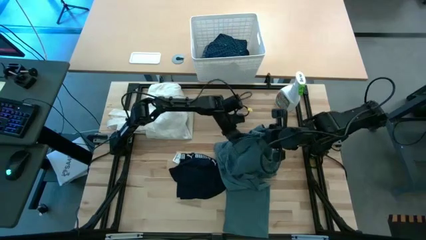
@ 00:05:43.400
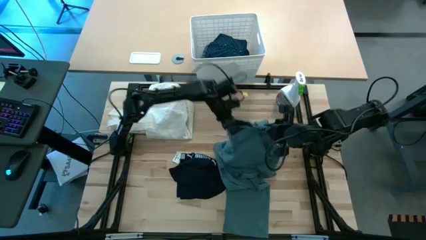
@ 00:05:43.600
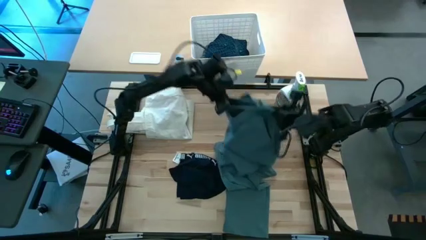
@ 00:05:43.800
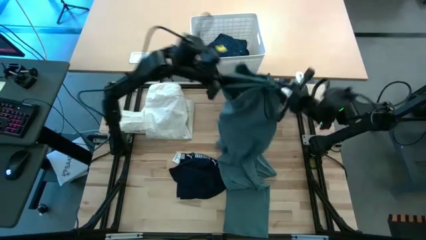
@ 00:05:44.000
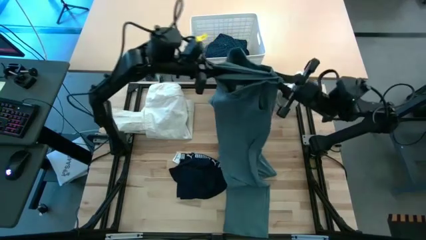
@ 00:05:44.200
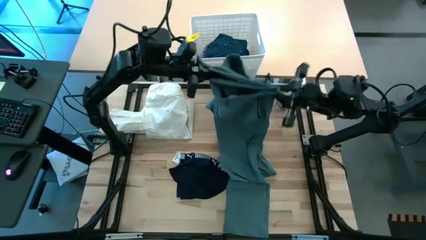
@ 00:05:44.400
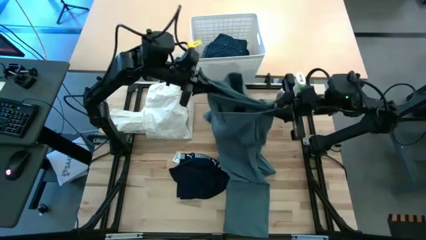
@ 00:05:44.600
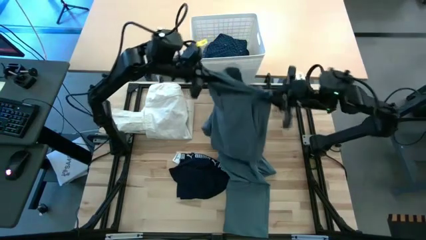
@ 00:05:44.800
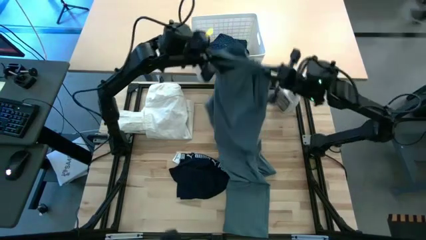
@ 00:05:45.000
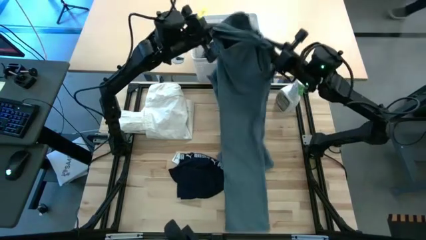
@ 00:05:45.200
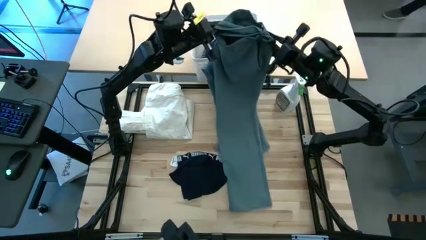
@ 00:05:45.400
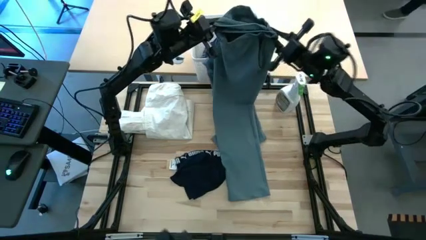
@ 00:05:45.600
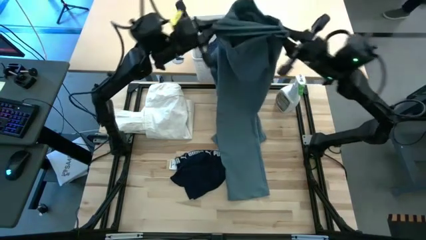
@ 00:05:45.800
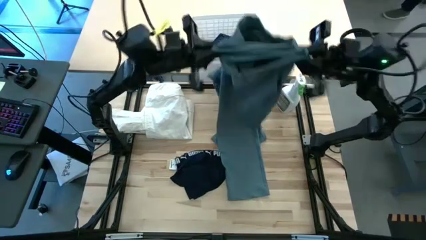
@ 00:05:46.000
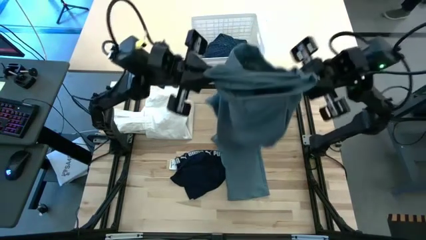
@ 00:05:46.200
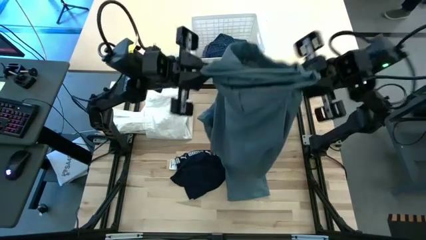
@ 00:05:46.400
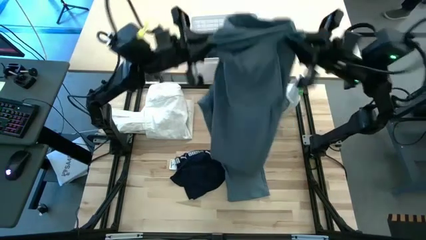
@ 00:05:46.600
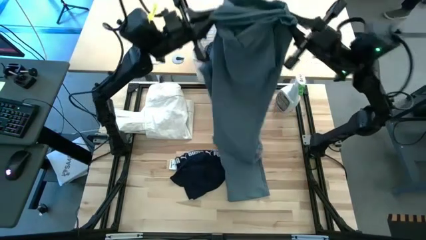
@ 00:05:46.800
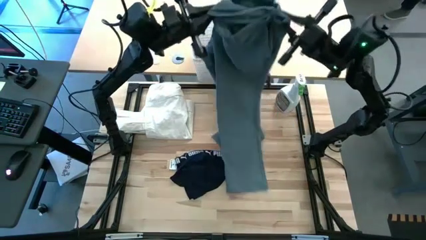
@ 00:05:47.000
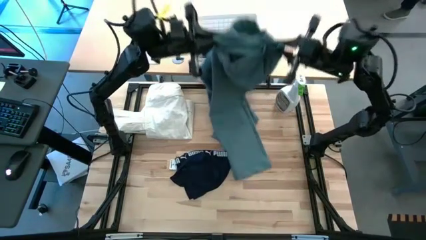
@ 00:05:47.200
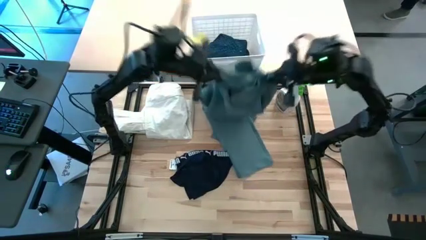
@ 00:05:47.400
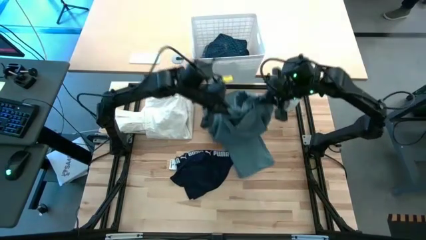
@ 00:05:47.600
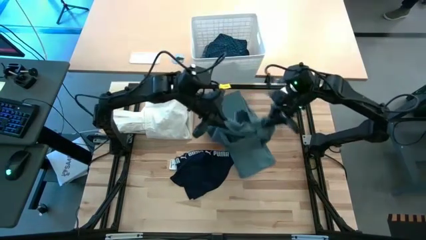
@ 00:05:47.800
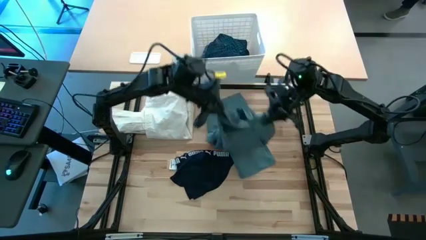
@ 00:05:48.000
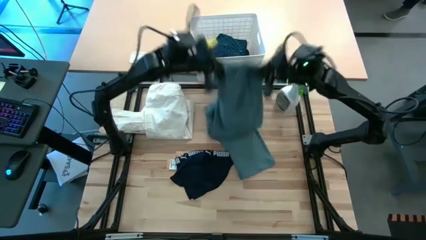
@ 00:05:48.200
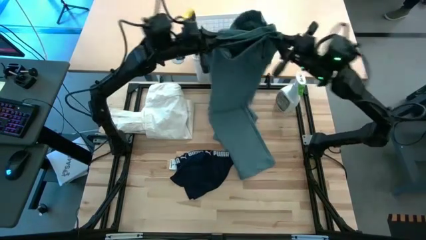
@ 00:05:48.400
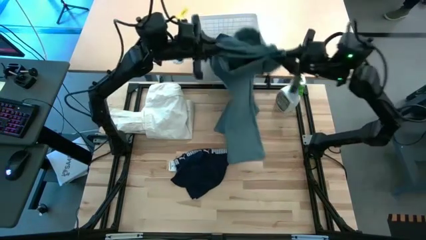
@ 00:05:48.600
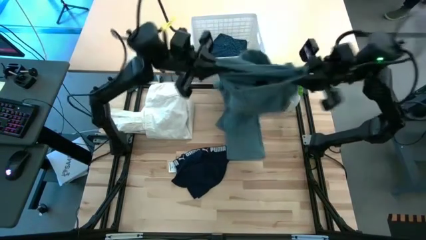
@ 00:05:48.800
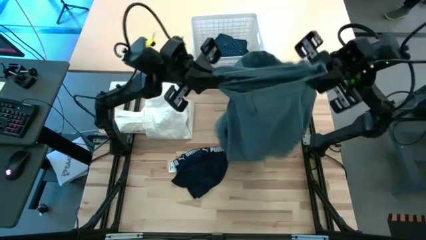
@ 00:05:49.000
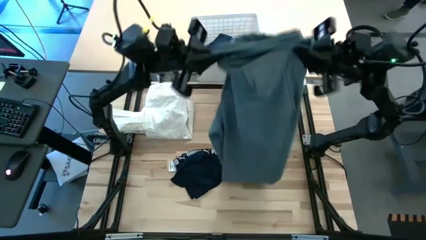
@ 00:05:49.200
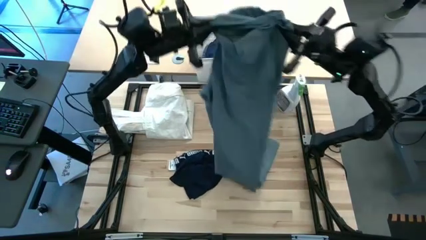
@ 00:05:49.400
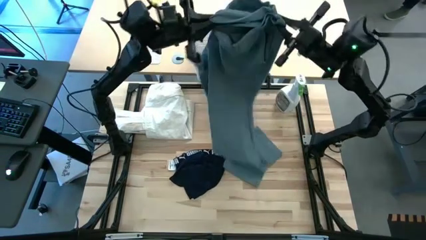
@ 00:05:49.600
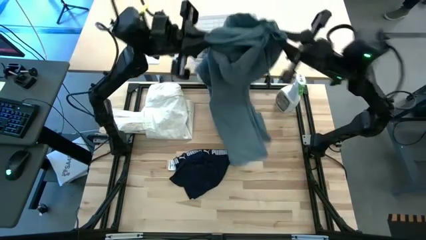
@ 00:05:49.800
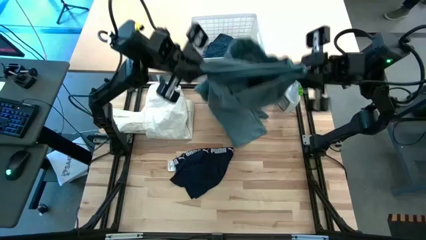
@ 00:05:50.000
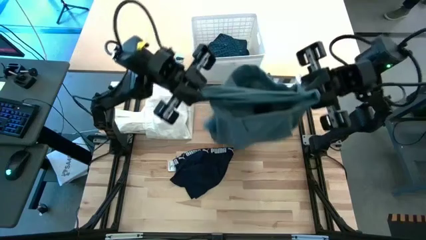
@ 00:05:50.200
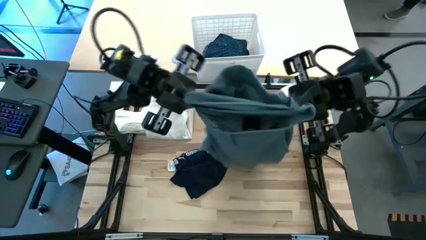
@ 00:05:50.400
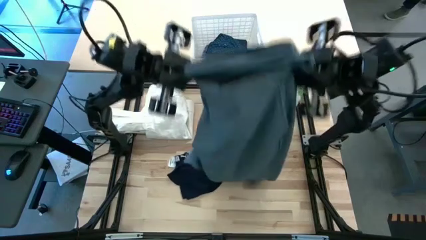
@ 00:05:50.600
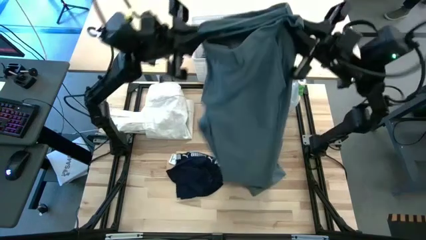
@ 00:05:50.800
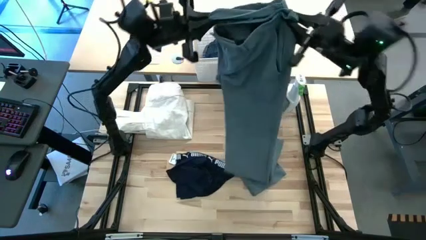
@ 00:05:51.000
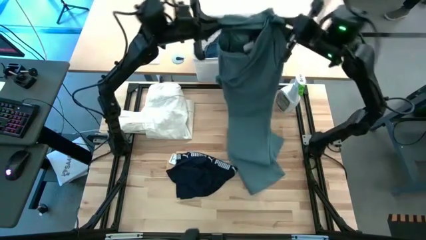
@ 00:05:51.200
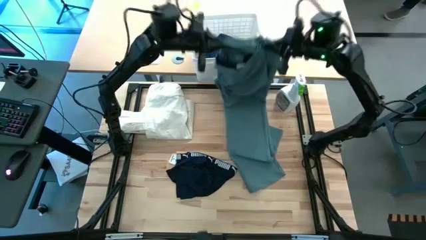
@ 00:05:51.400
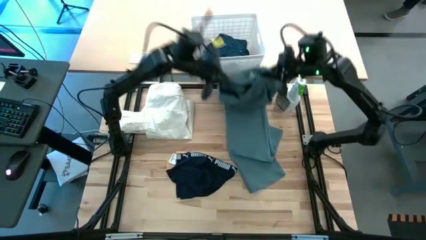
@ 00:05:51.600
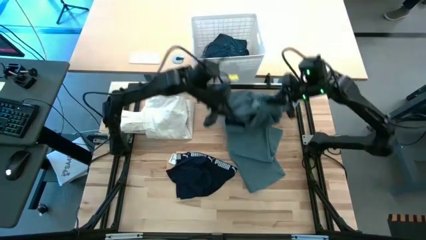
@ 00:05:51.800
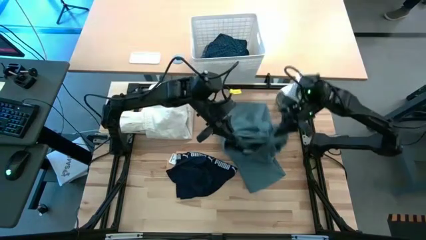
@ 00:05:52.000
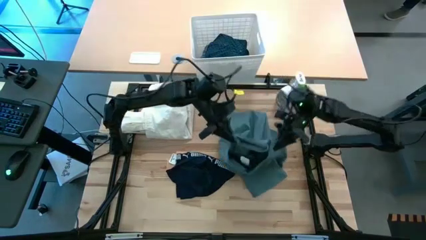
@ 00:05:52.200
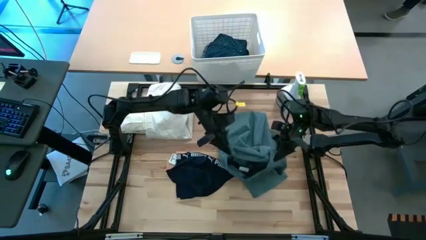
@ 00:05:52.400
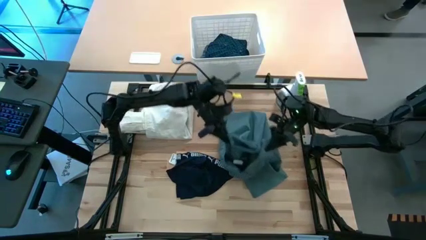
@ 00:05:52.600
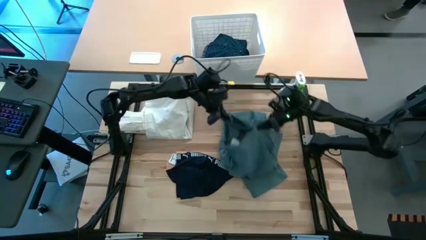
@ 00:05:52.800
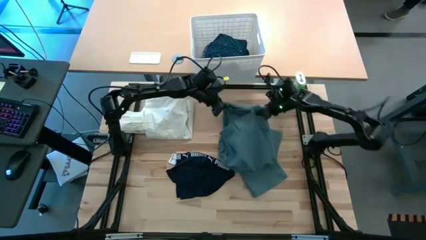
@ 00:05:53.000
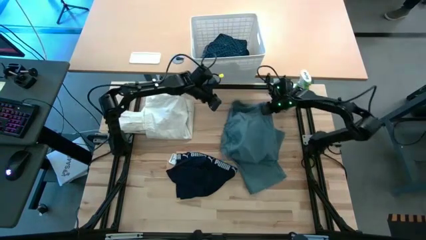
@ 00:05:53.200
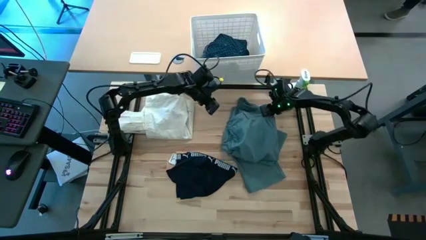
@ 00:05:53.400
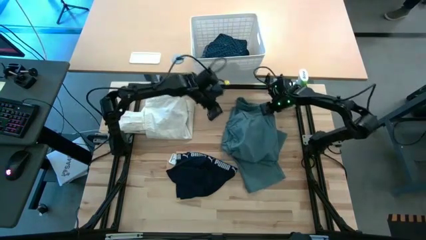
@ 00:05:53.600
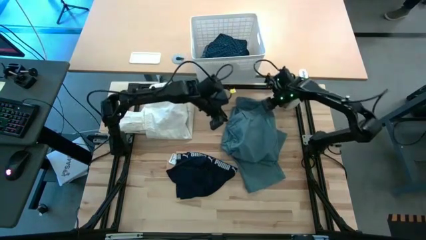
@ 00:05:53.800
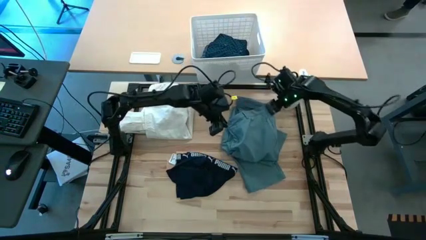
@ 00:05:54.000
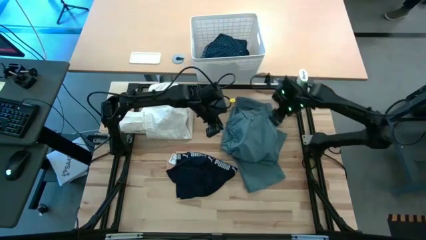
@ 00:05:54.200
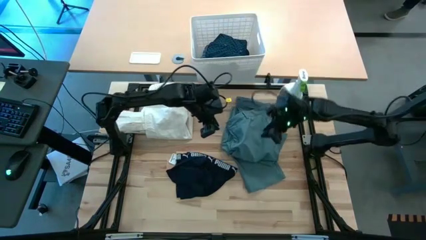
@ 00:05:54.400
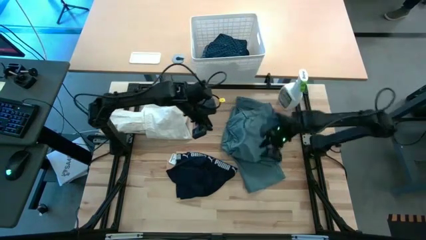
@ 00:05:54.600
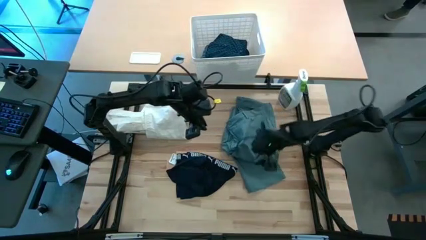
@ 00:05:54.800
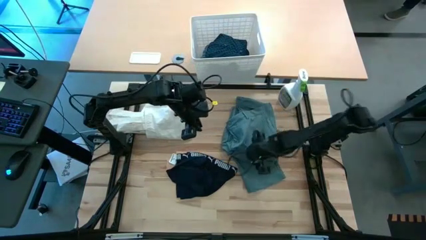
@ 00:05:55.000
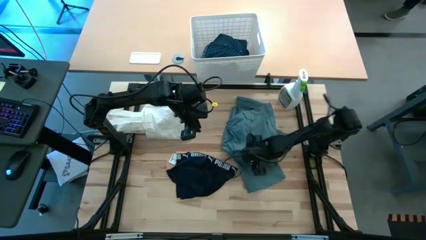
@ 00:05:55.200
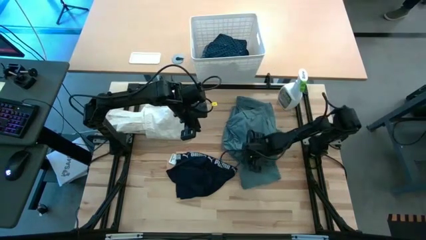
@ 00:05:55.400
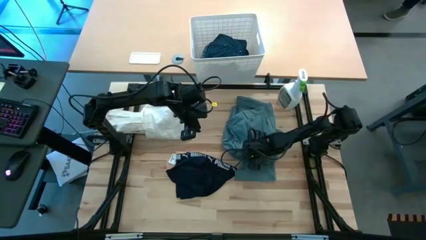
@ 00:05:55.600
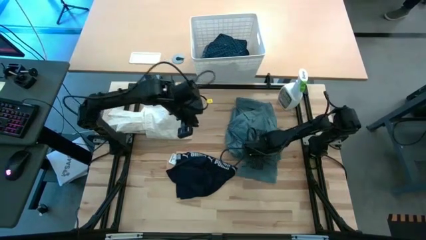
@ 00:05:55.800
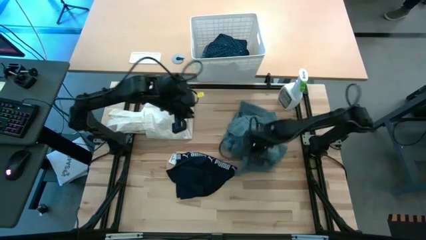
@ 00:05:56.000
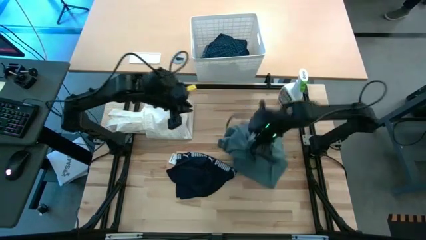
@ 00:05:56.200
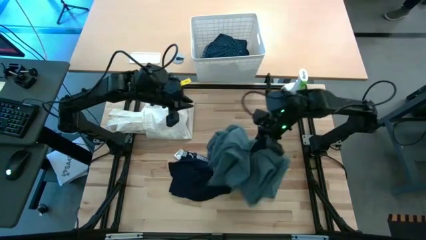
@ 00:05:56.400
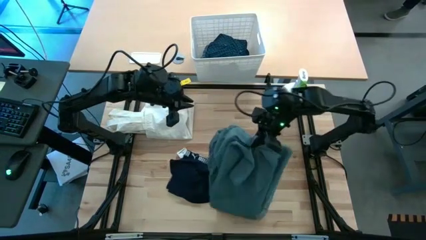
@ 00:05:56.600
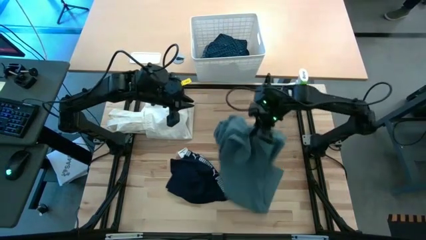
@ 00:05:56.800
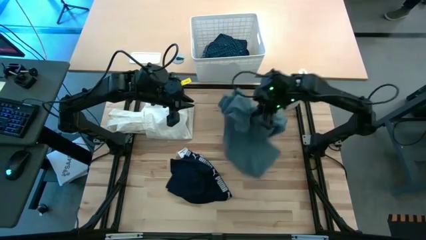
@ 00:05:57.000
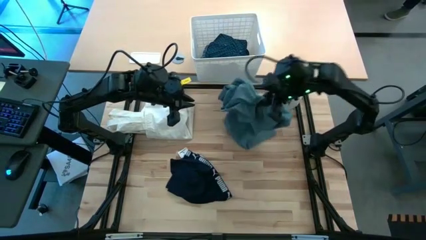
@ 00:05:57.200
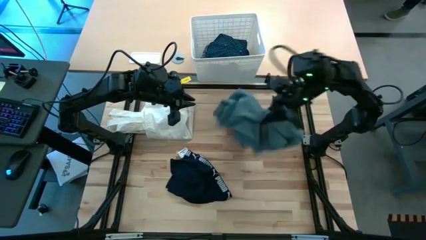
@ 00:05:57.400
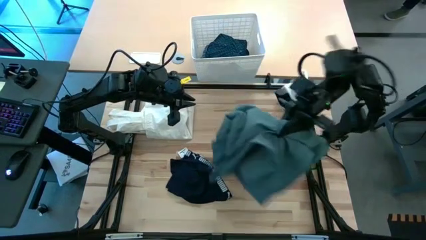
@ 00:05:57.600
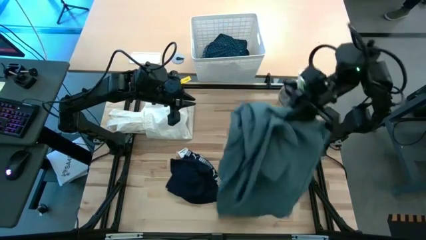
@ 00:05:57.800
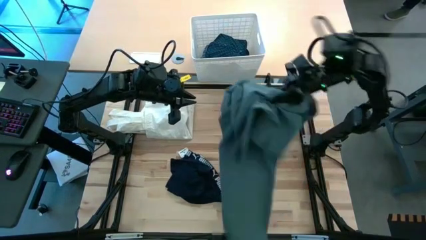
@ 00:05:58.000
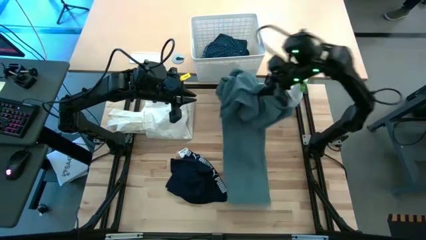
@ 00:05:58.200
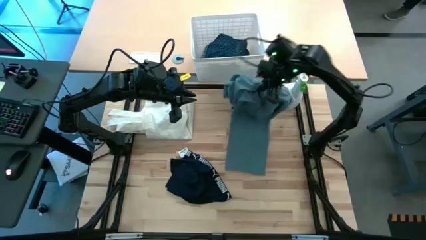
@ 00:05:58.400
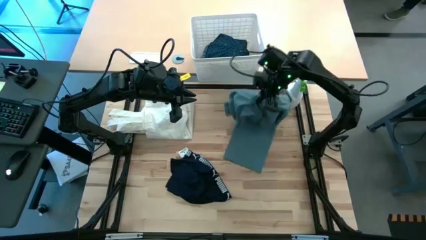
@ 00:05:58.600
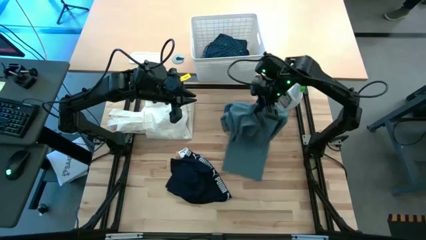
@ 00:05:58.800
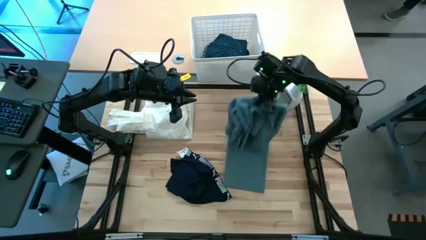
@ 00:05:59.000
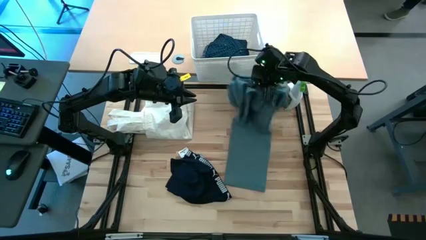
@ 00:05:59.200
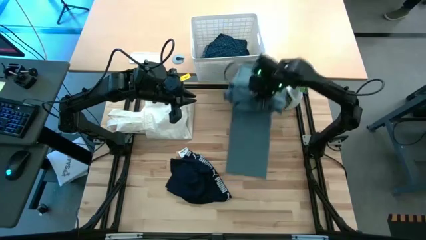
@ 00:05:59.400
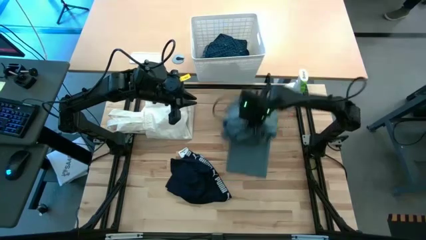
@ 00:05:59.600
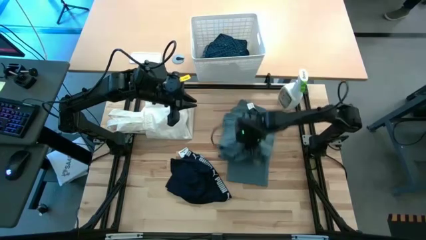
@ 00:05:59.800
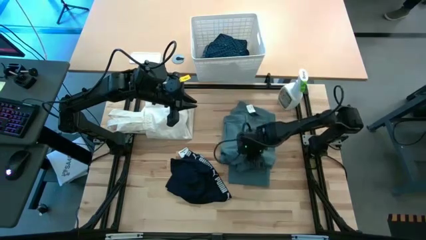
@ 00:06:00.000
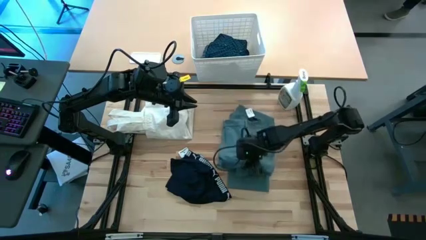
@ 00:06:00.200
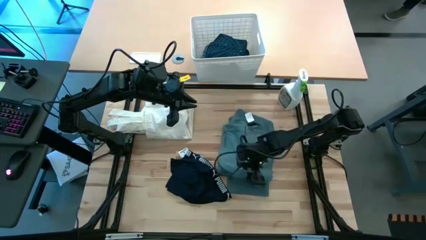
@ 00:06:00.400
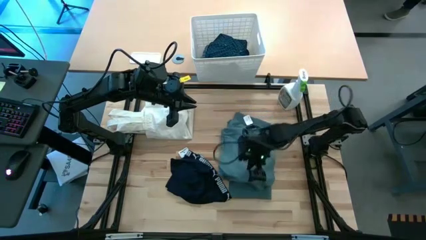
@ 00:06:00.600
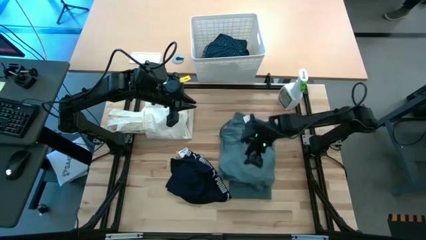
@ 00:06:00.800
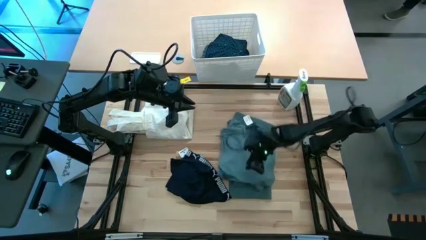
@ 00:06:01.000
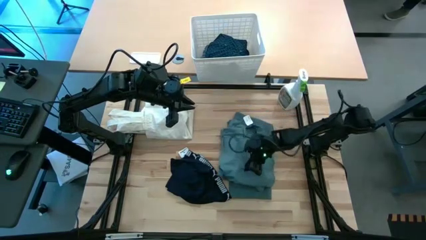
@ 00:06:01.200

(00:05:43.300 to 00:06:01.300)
Fold the green pants
